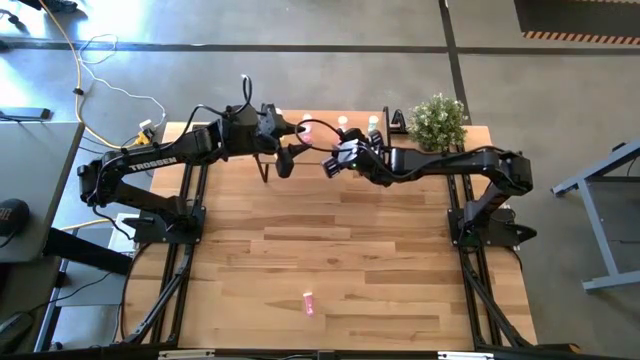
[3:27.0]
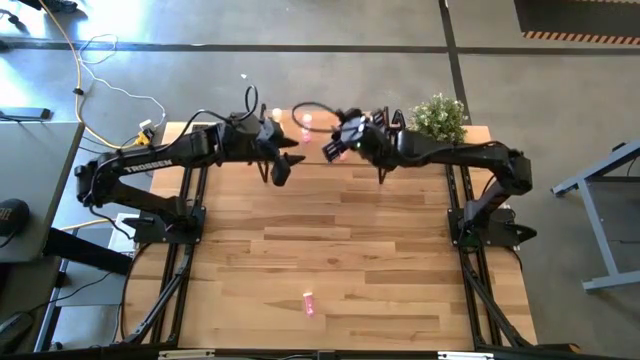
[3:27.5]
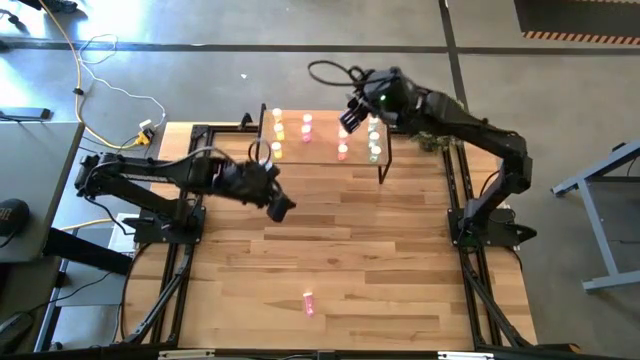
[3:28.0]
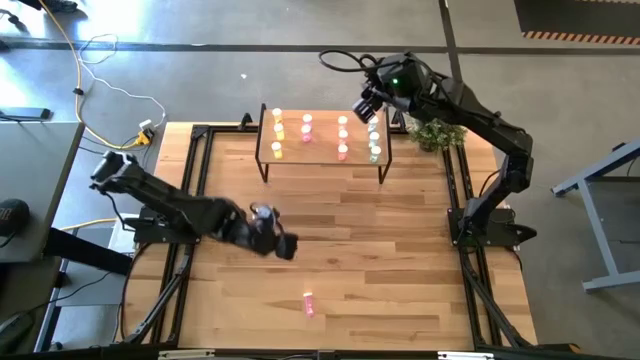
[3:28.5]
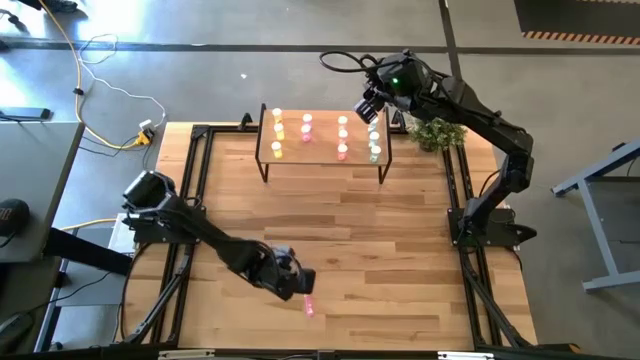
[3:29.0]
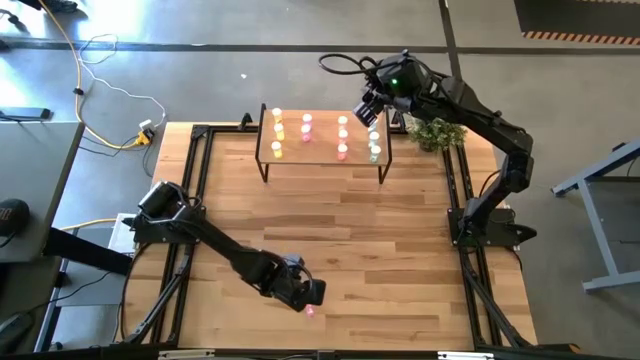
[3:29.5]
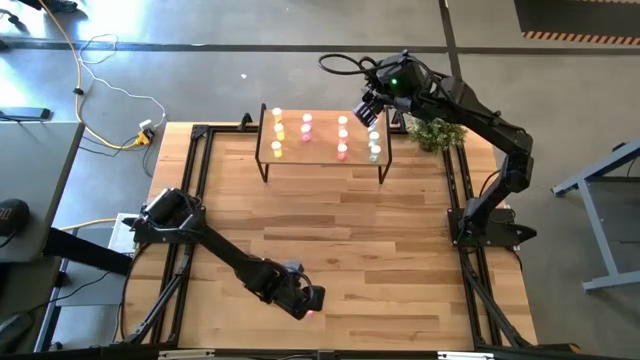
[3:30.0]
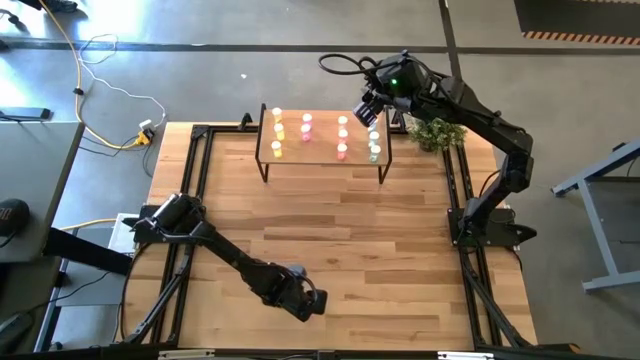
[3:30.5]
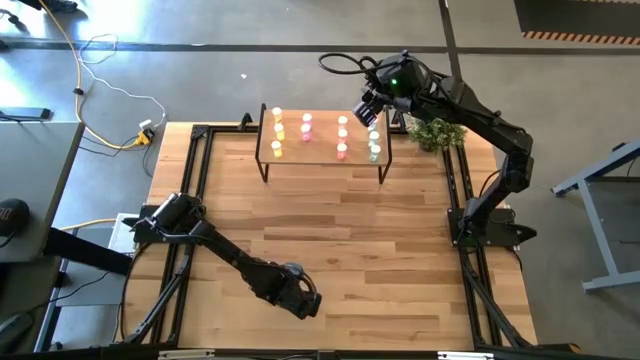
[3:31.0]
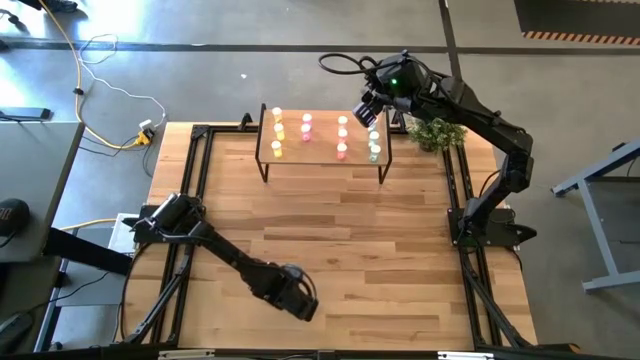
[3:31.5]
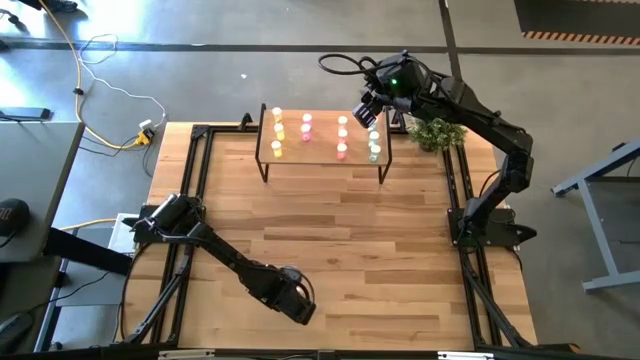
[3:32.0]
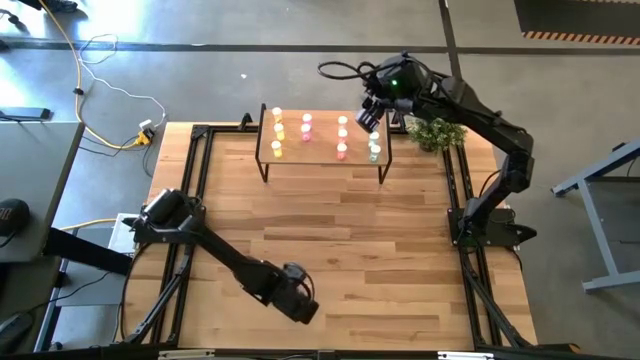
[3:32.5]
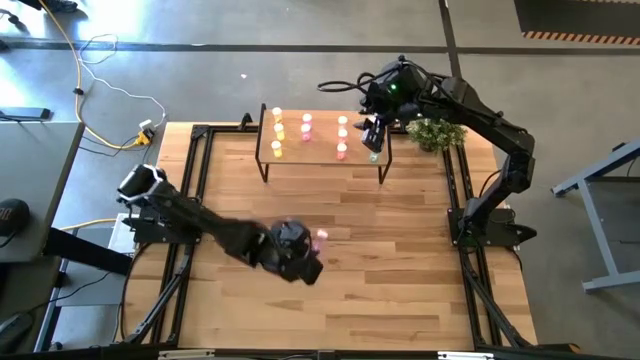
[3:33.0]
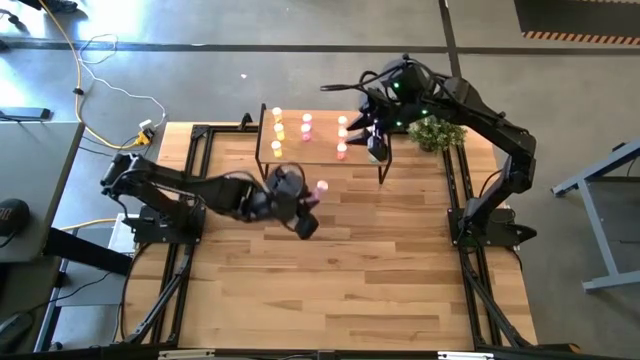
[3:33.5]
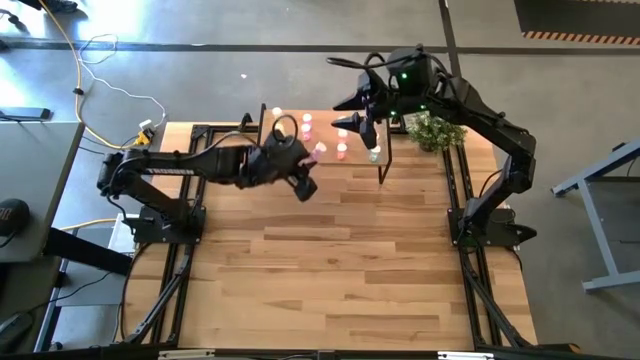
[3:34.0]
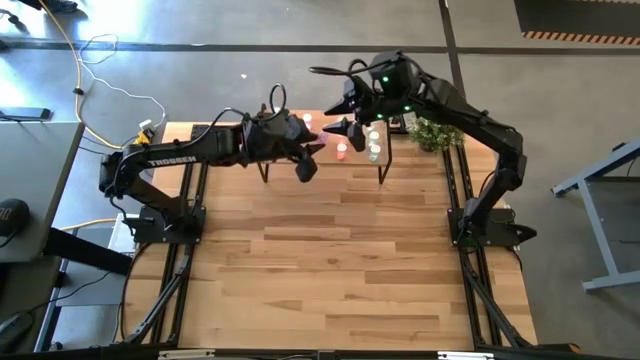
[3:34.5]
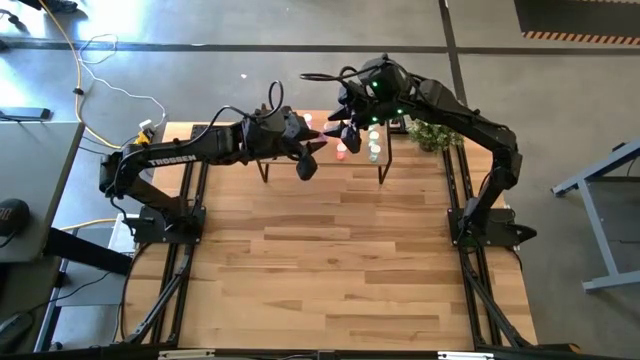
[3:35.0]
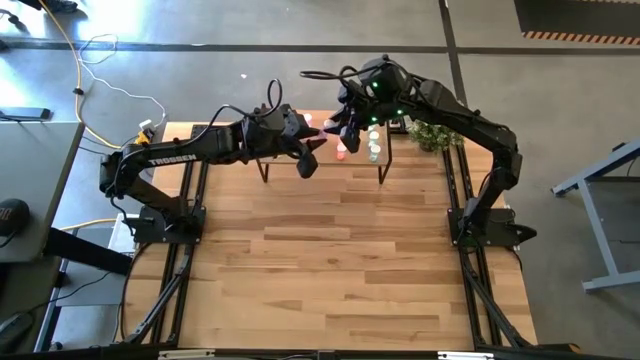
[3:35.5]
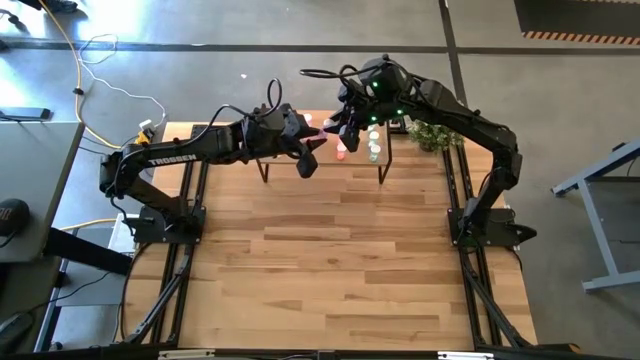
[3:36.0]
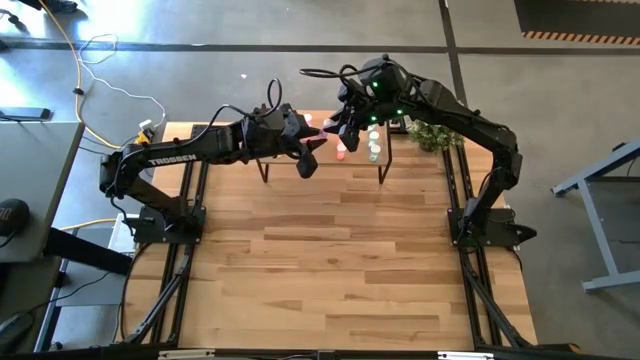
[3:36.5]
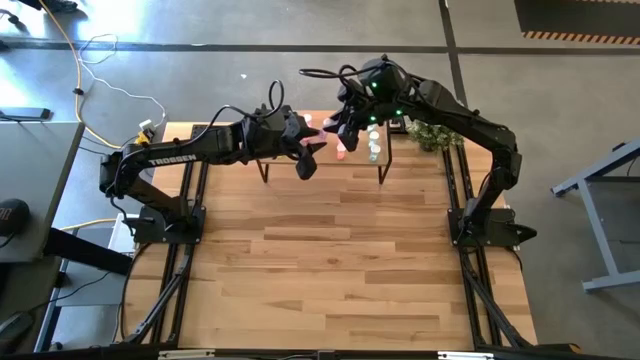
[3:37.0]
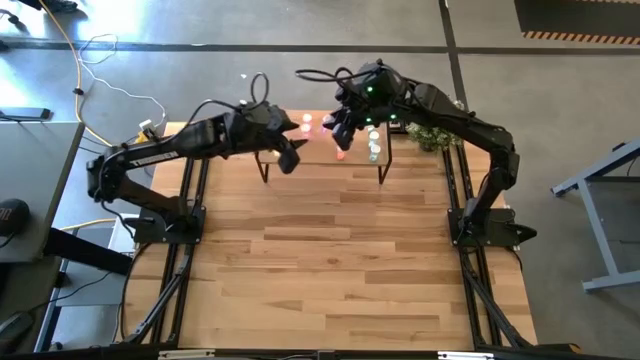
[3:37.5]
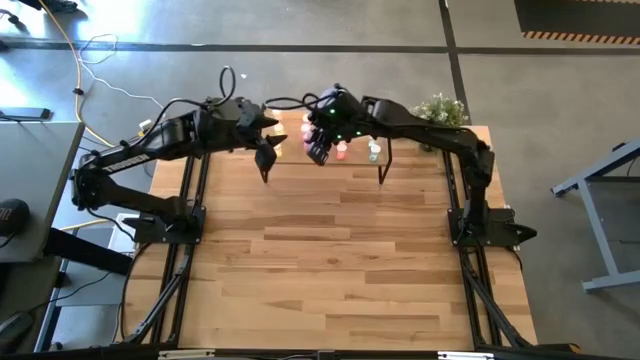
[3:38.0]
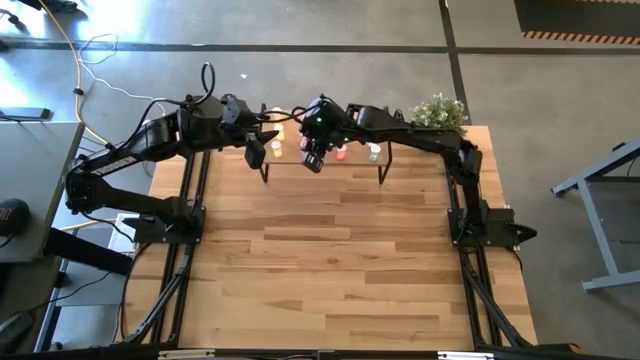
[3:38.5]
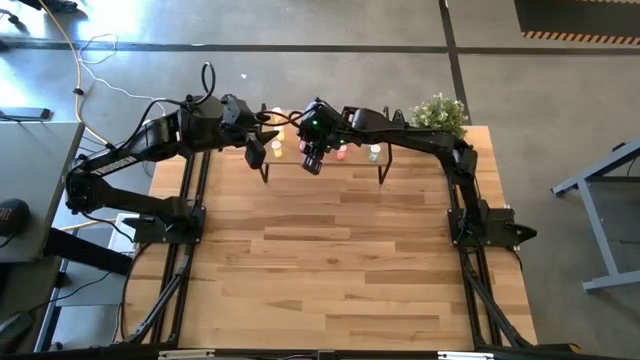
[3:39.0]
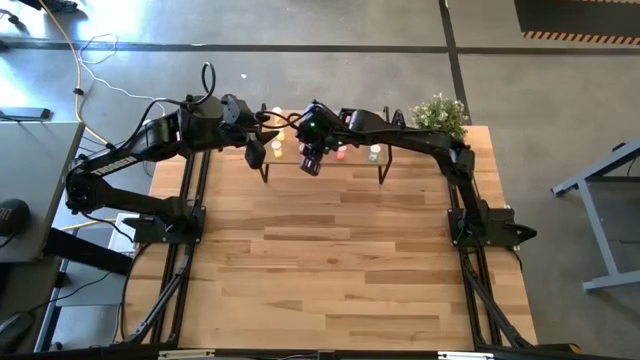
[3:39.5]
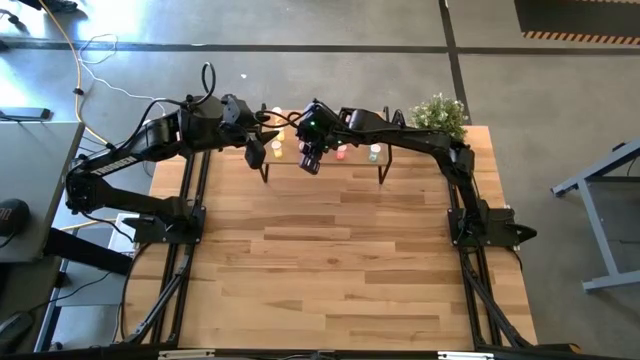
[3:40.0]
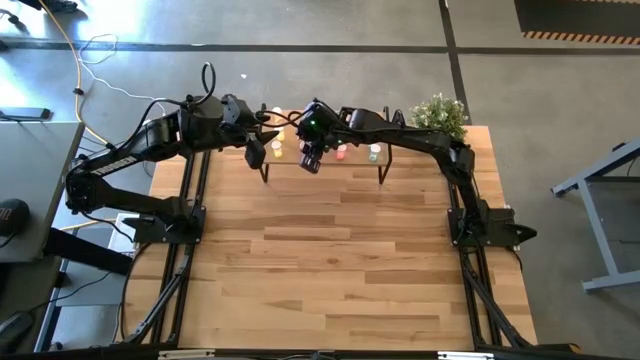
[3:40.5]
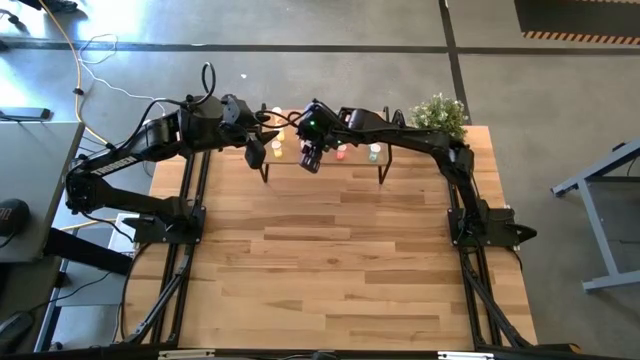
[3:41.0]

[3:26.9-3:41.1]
Task: Pick and place medicine bottles onto shelf by color
Put the purple pill bottle on the shelf aligned with other purple pill bottles

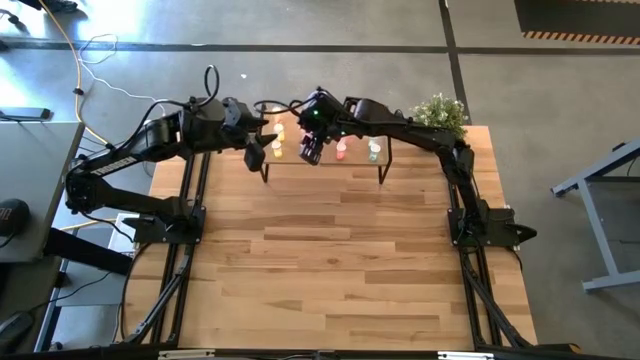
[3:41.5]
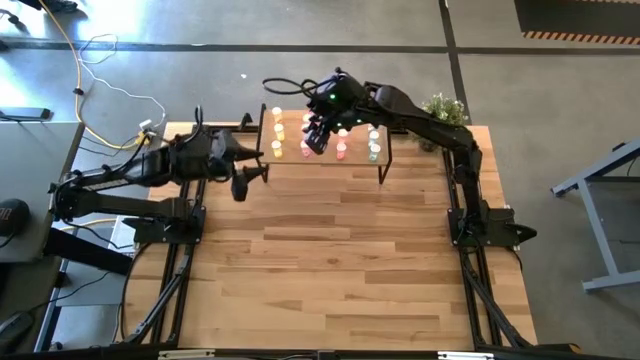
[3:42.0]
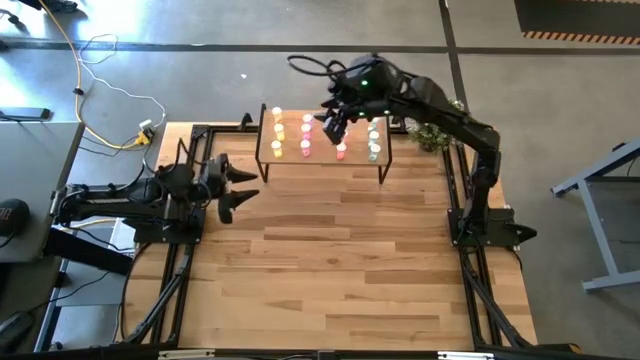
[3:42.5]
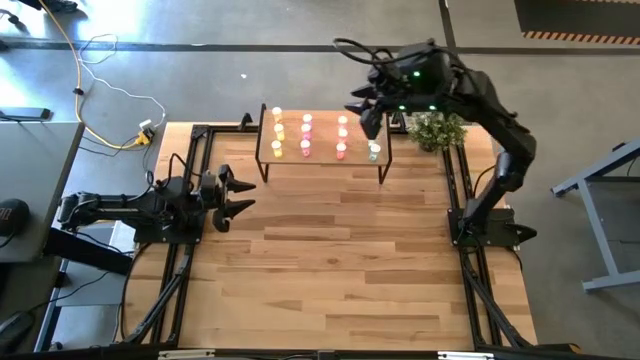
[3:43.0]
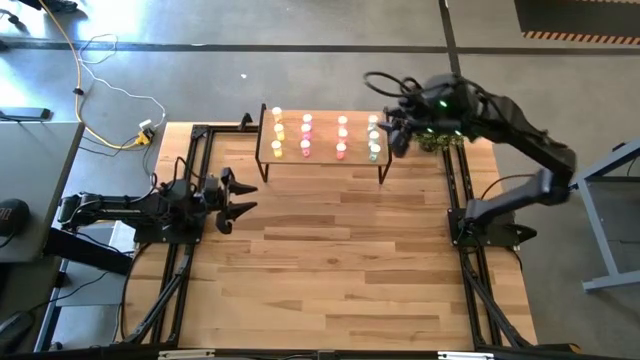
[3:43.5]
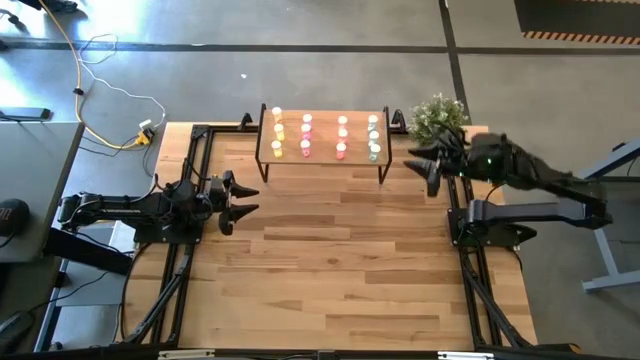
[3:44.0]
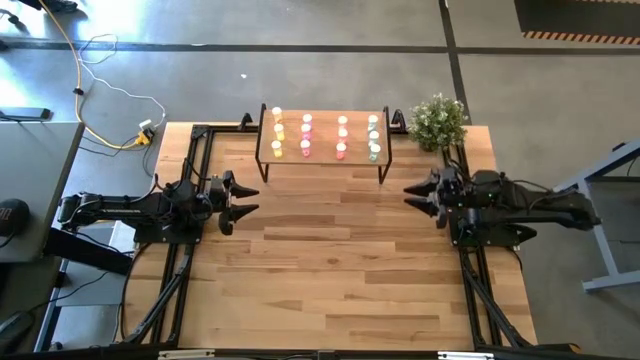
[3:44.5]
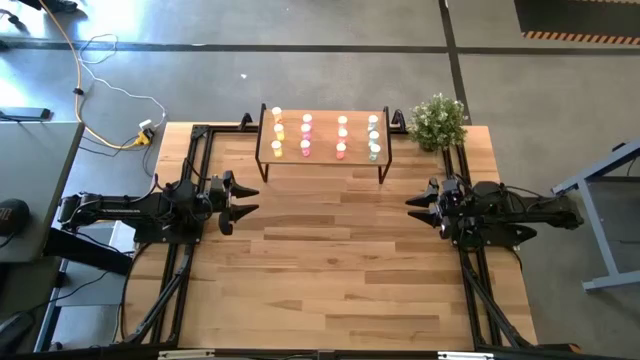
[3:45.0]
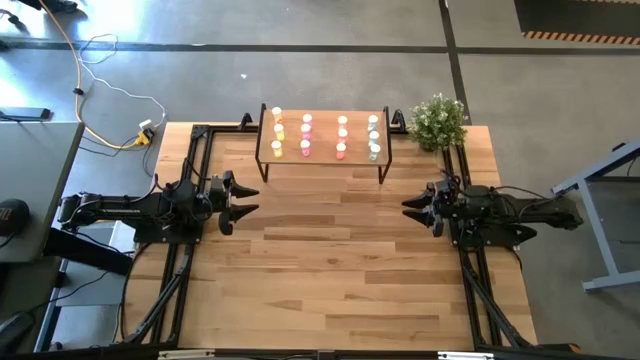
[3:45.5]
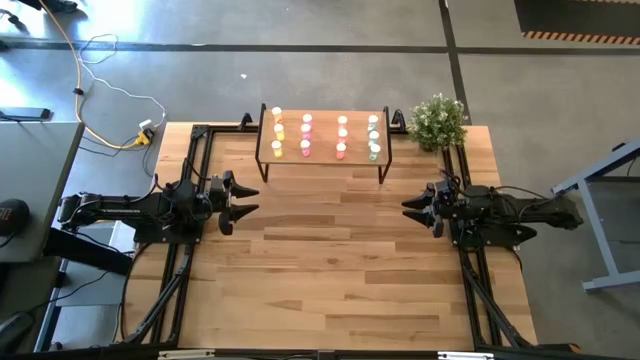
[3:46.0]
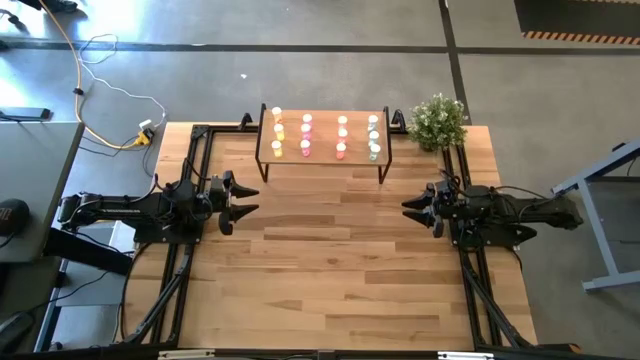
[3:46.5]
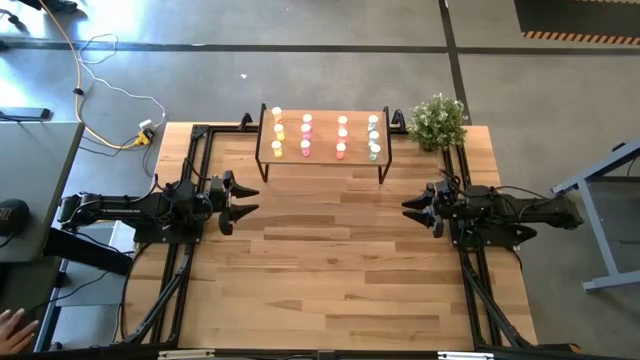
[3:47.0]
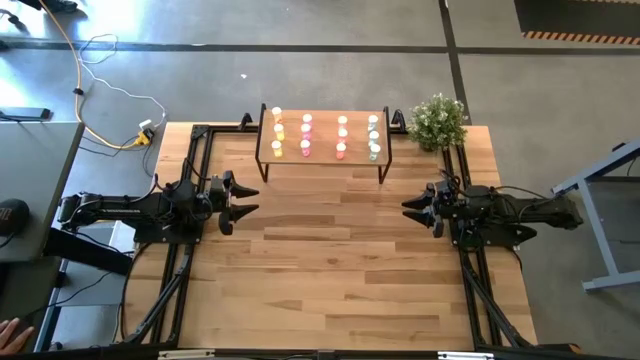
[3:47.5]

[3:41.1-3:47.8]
Return to Home Position
